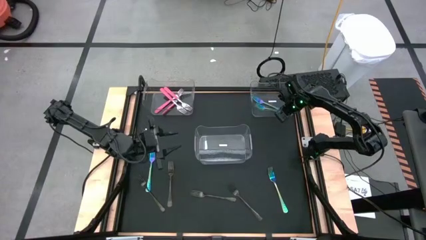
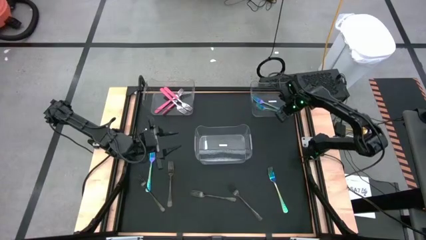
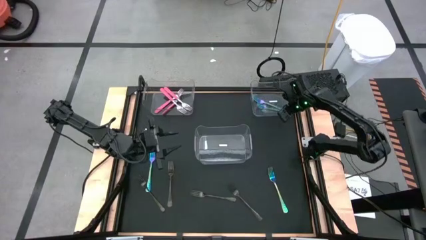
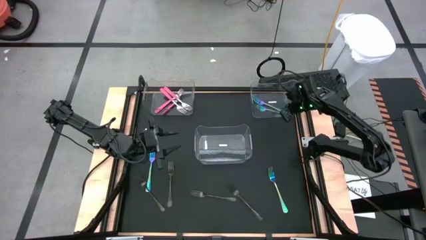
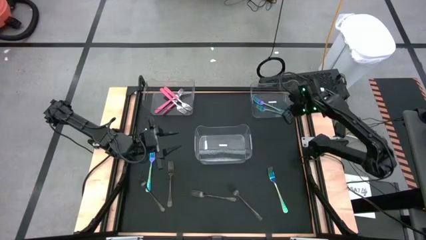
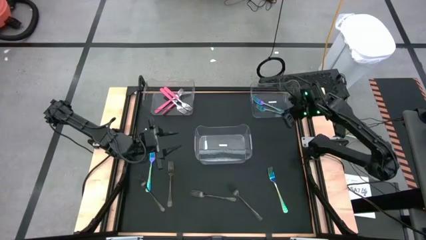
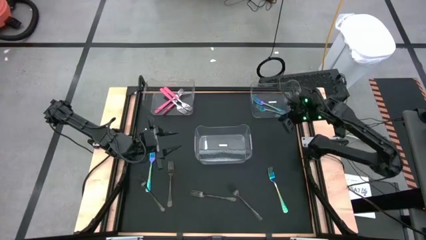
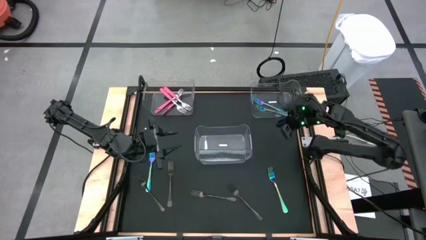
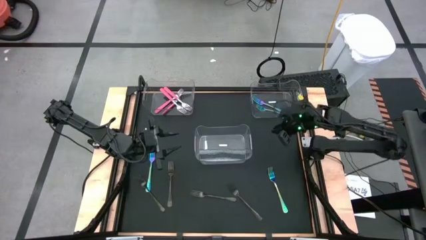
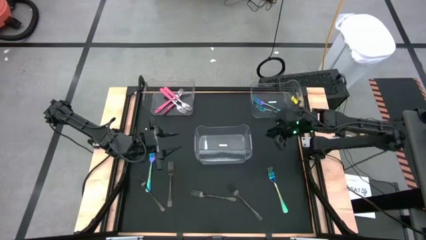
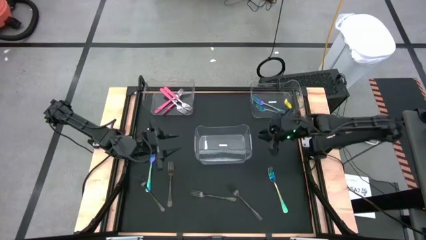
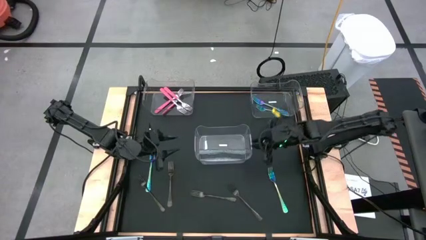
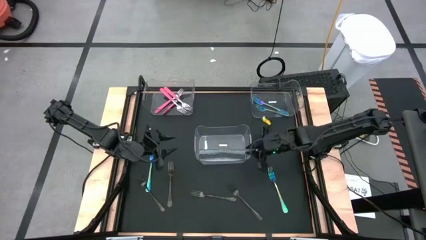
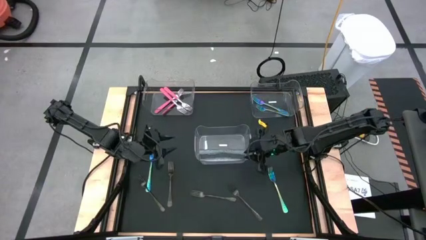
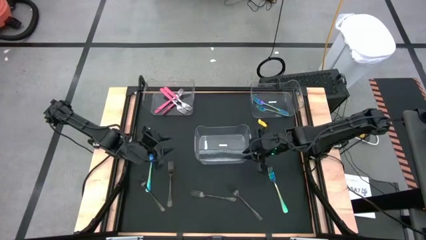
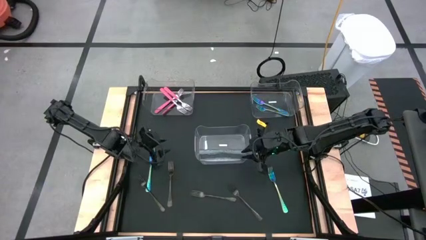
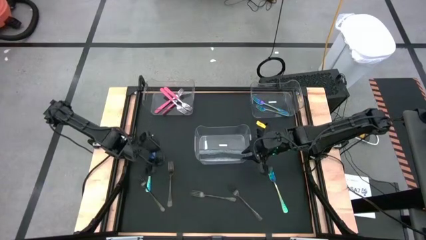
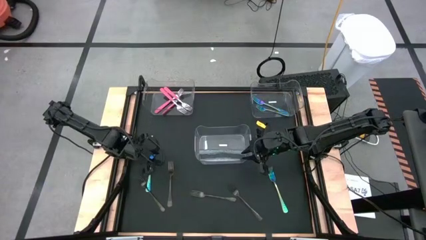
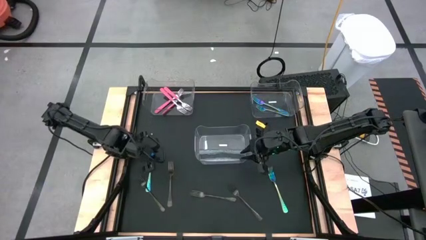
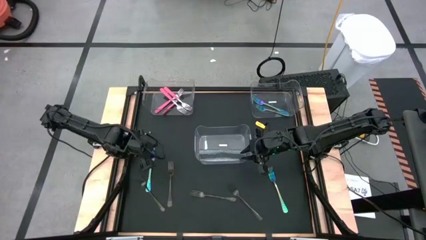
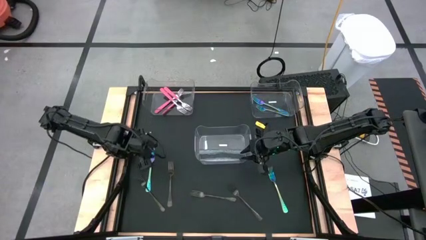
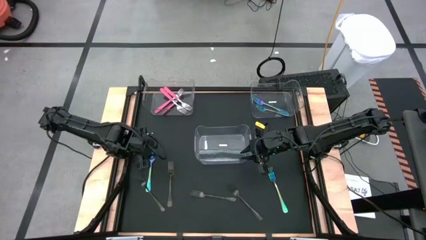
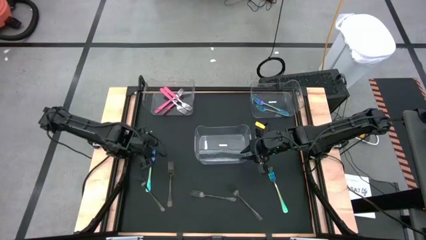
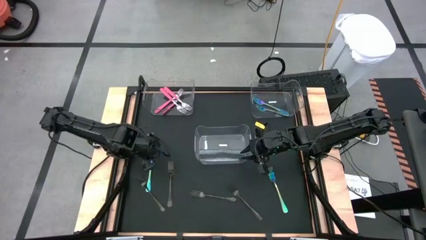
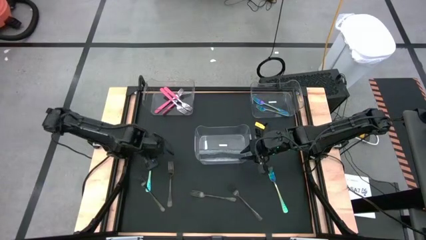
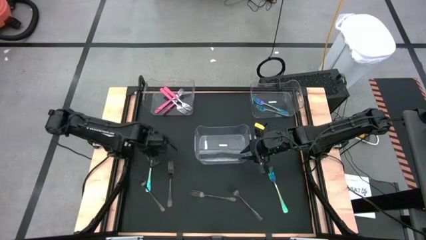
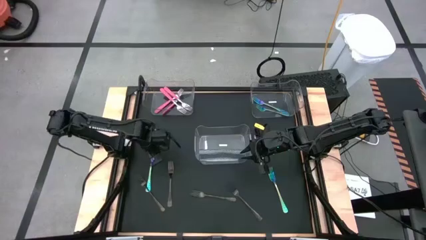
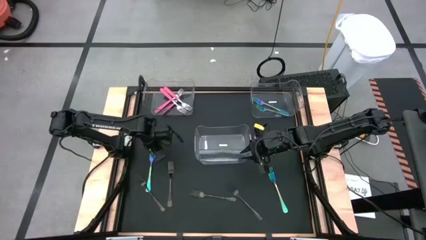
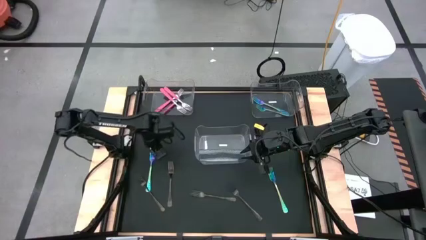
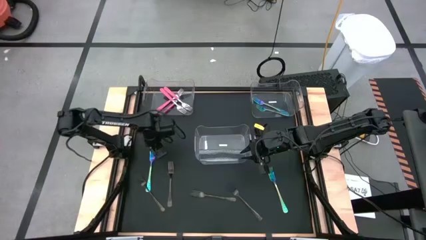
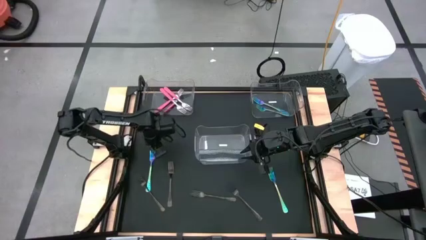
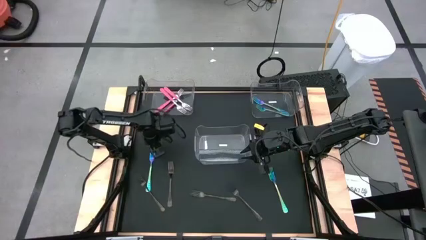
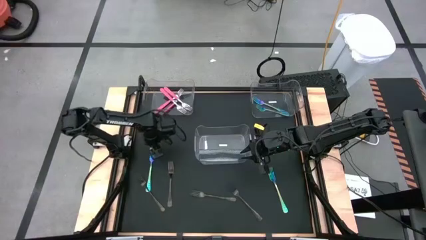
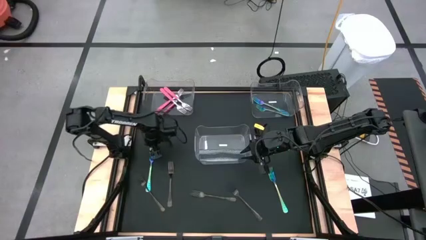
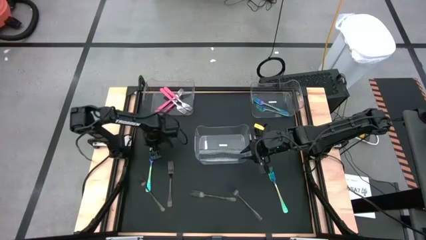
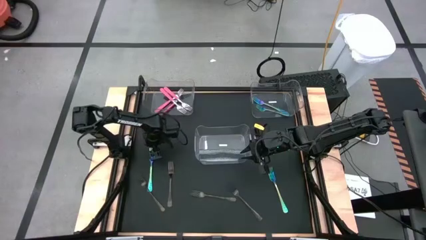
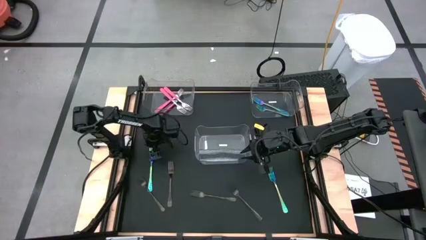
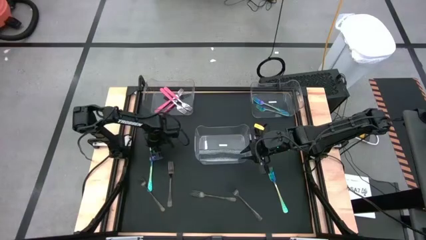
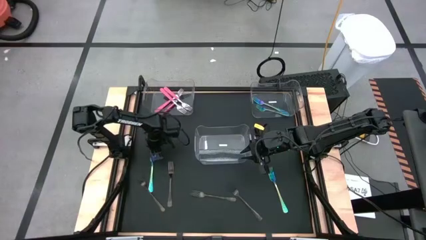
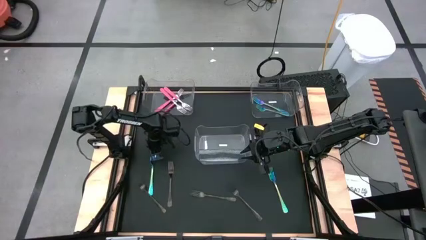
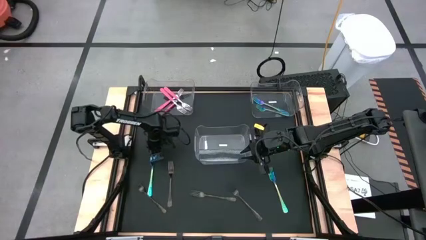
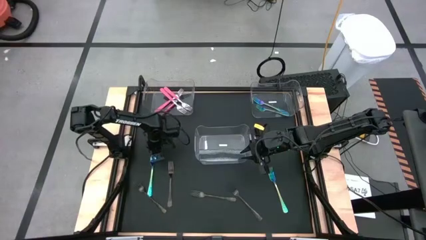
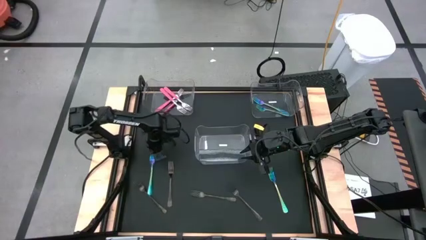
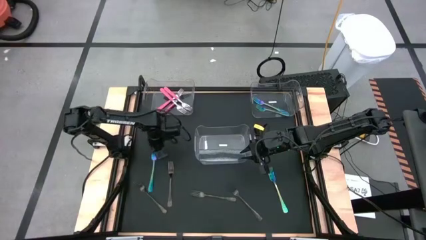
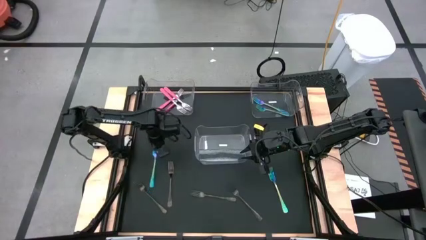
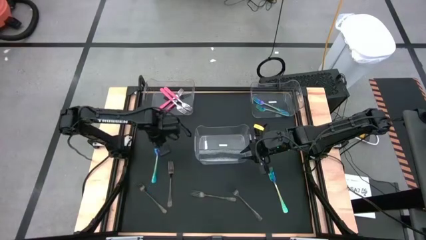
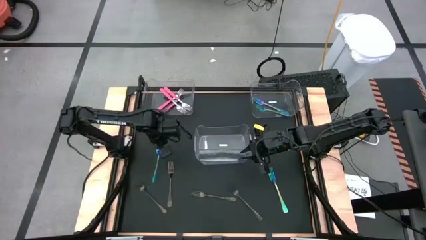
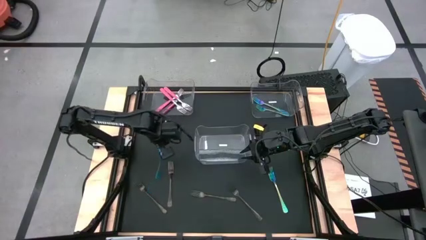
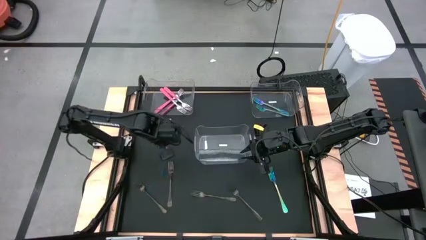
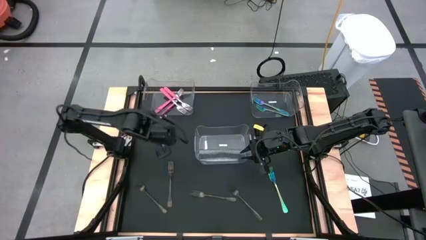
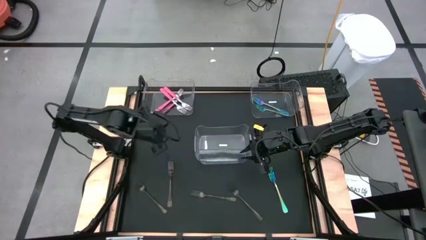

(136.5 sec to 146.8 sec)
Task: Sort silverware by color (type)
Put the blue fork into the right transparent bin

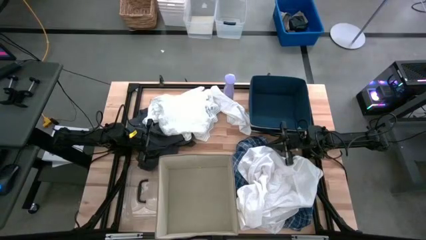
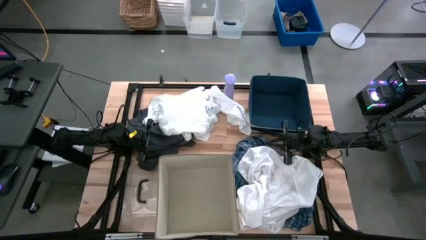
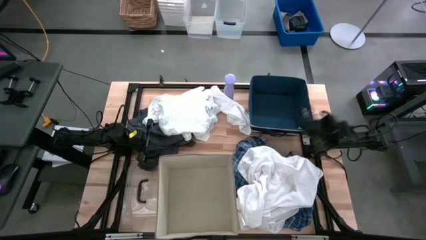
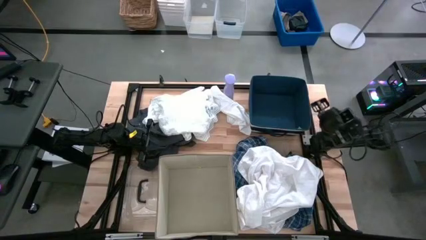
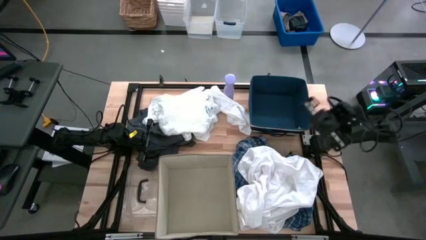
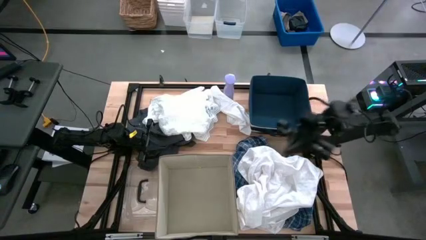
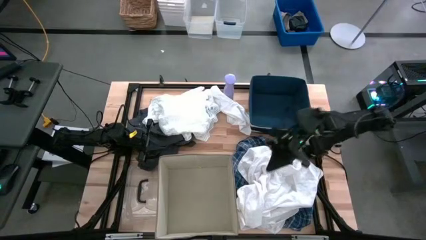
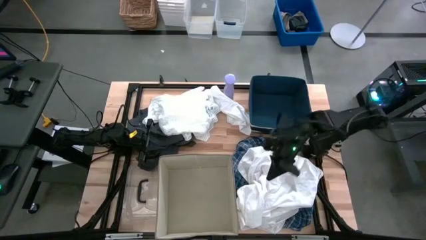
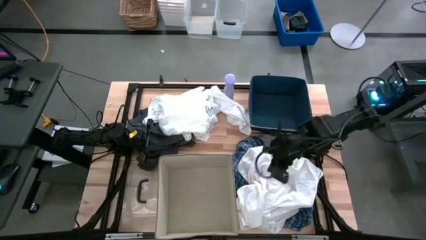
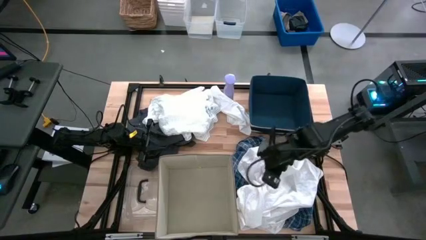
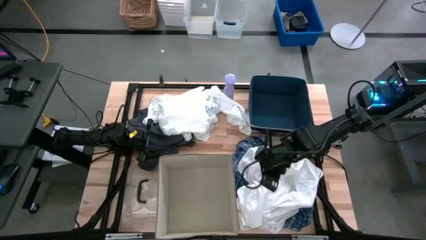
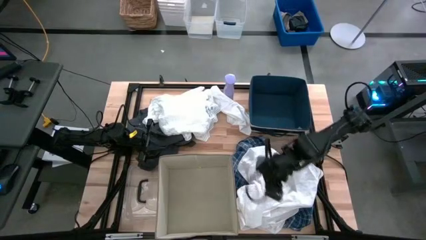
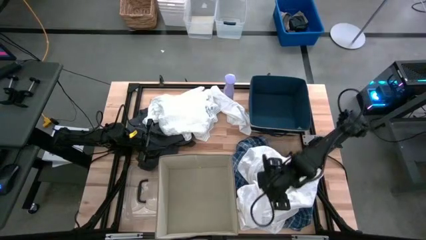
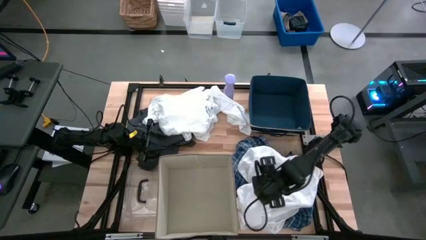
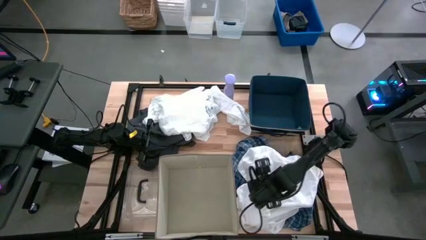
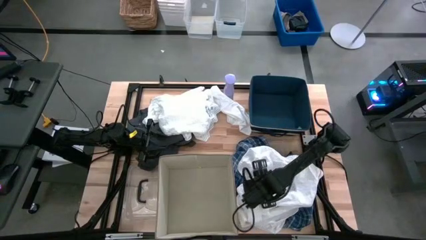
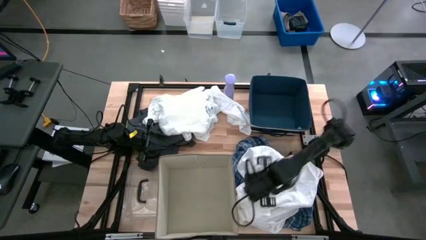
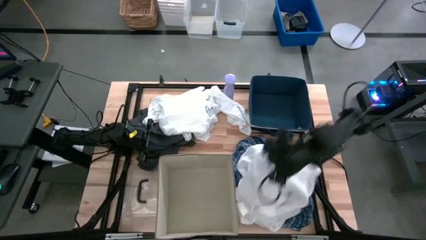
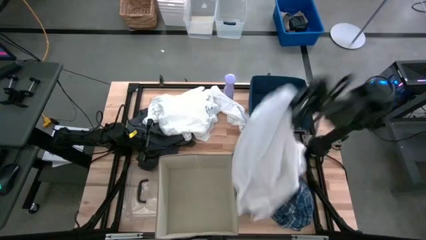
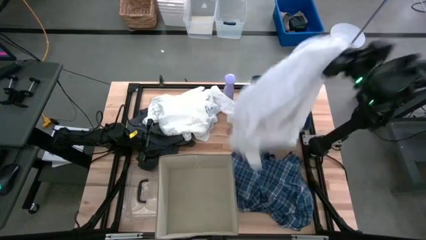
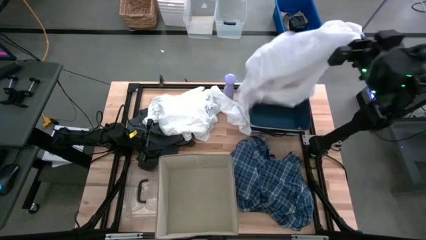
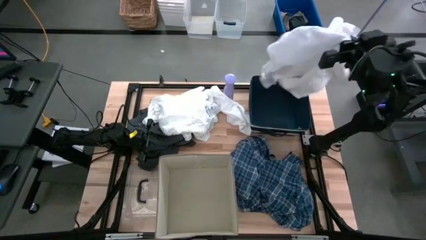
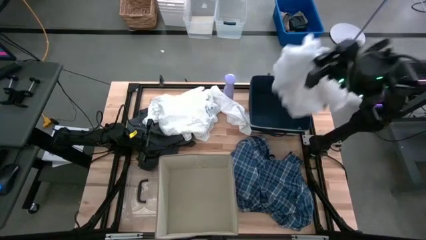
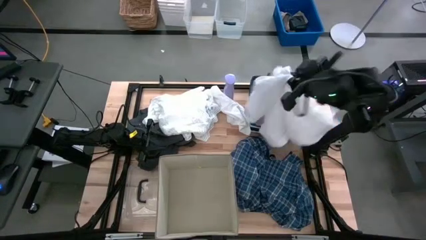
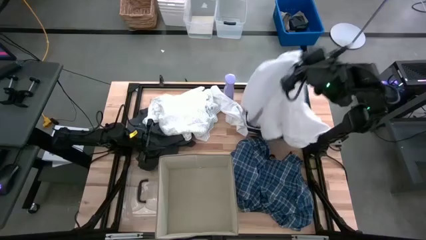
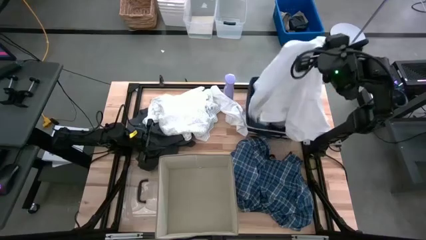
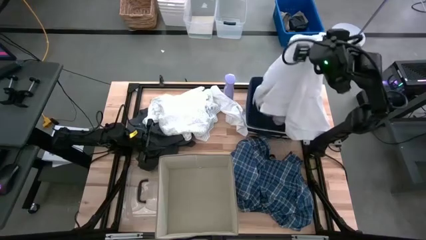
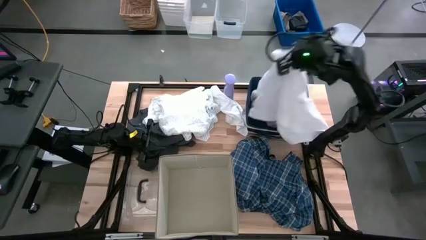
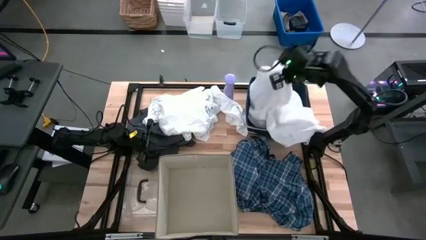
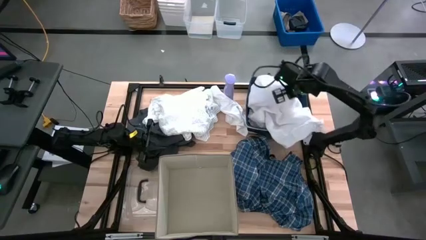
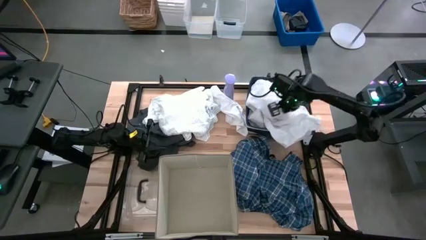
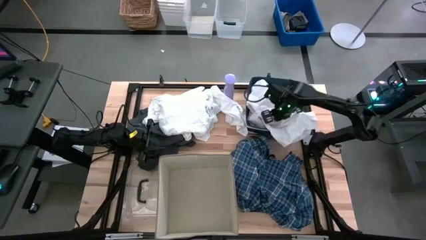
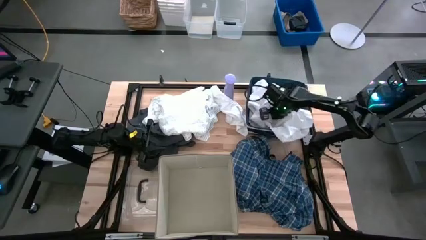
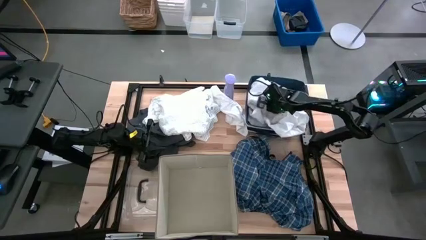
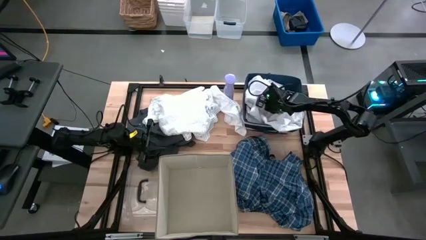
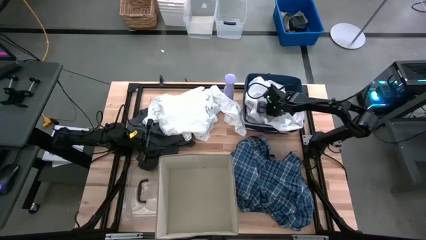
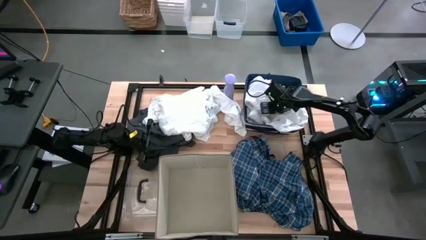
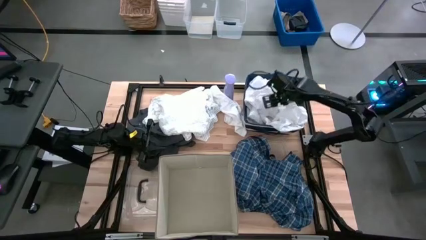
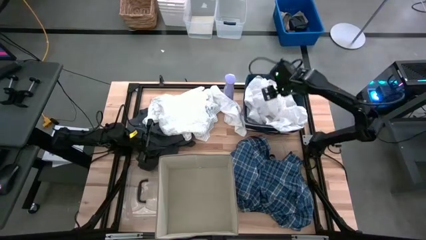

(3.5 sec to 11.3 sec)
Task: Sort clothes
Put the bottom white shirt into the blue bin
